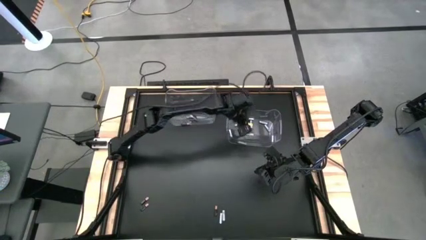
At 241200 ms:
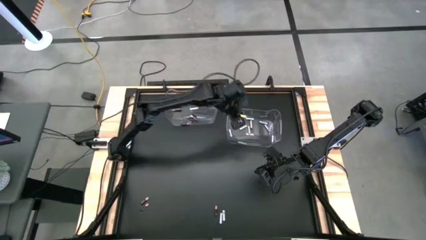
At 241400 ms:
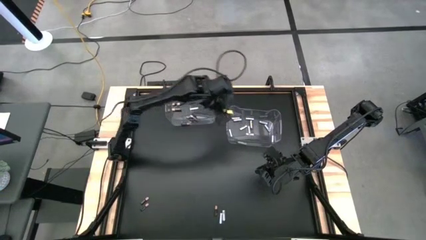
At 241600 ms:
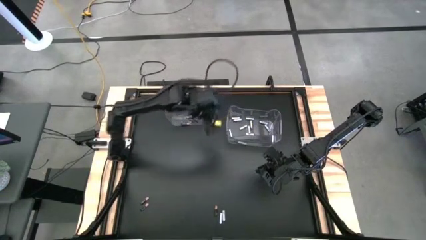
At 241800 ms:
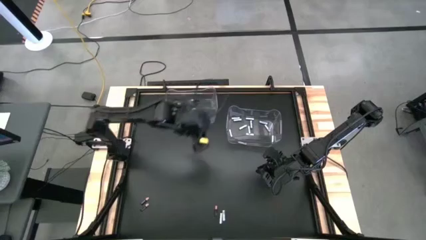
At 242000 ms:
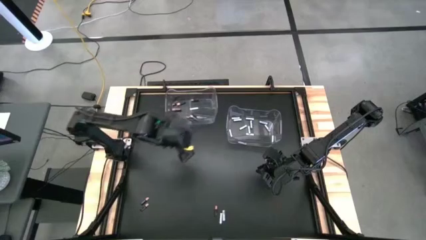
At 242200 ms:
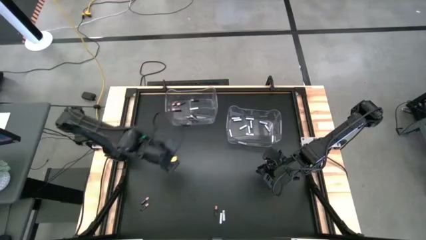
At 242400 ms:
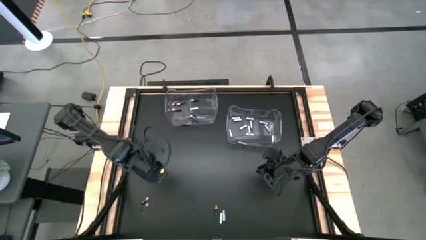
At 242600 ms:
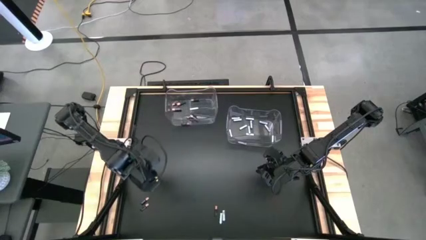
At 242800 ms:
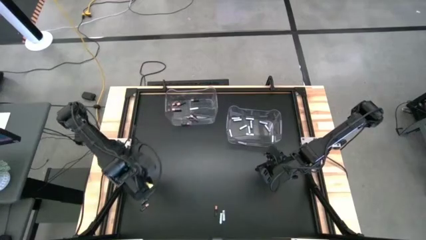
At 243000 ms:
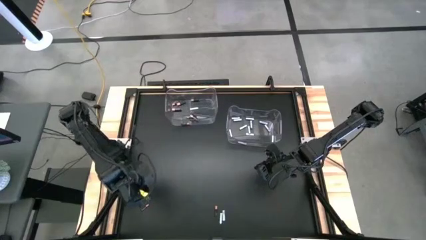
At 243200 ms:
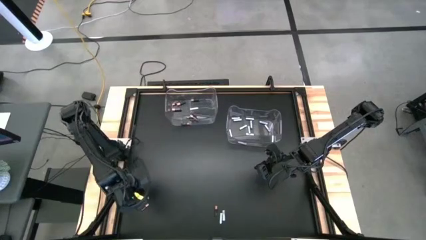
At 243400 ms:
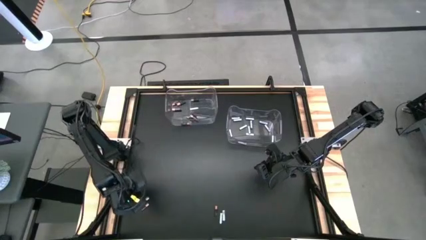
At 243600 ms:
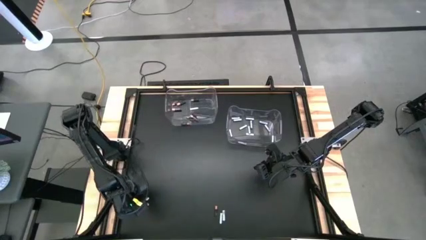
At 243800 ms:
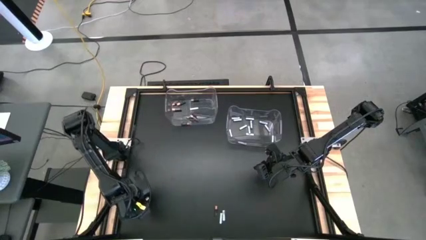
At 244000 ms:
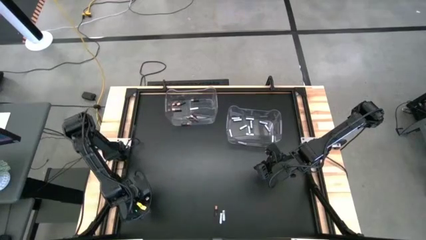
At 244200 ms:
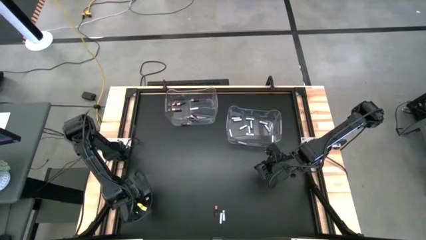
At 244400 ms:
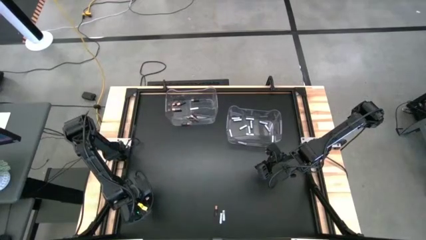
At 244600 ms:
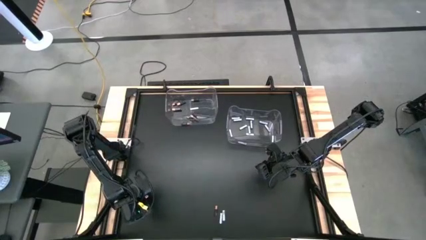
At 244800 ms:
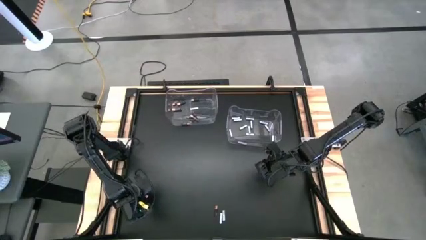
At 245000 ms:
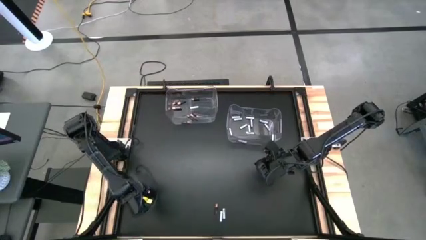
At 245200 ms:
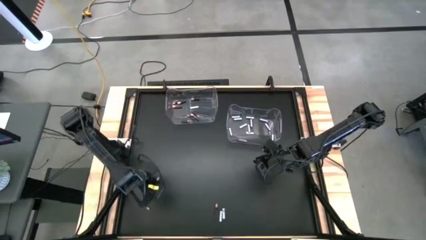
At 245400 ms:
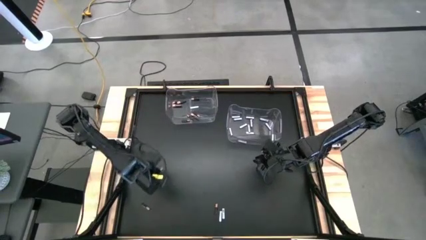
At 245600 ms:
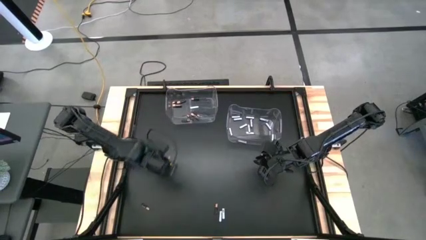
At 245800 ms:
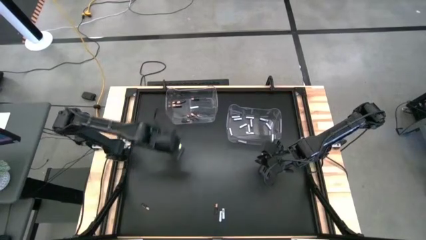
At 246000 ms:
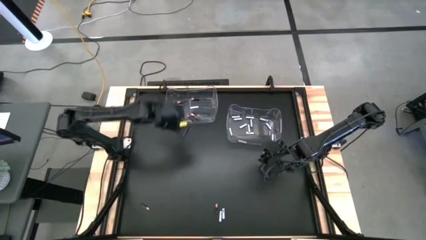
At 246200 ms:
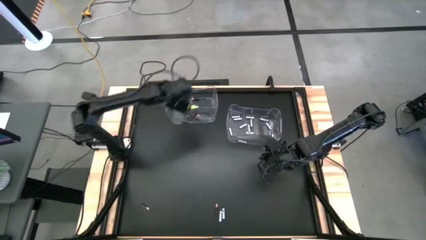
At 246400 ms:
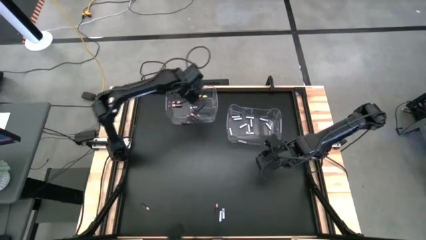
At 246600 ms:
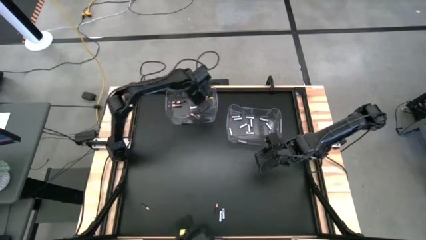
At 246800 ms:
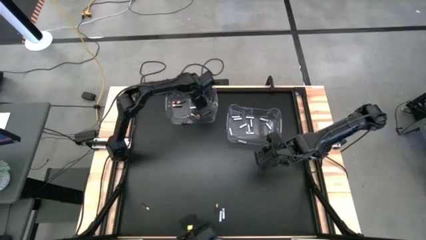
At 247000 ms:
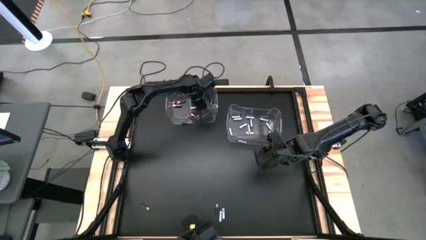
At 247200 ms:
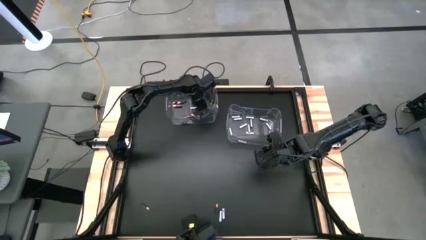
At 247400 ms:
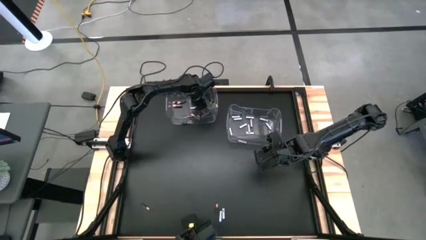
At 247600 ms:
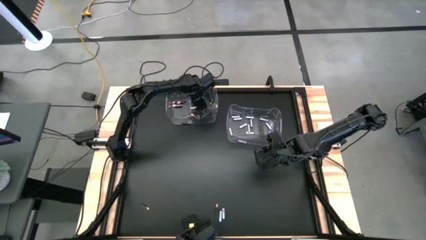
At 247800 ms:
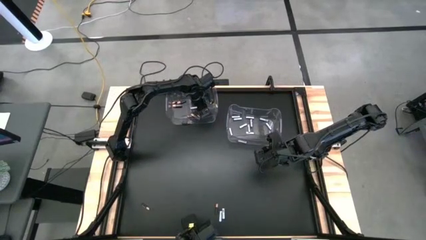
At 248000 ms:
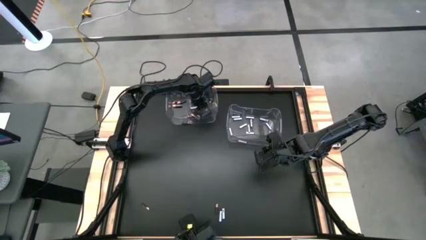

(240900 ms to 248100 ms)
Task: Sort batteries
Put the black battery into the left transparent bin

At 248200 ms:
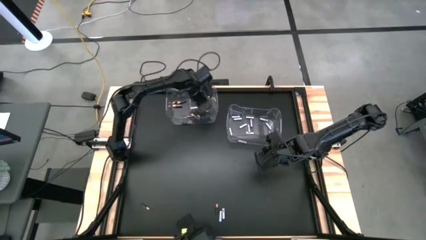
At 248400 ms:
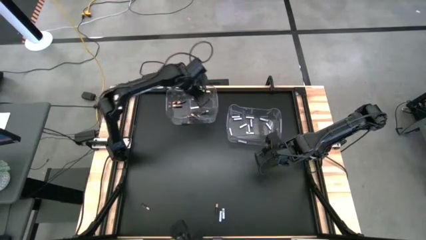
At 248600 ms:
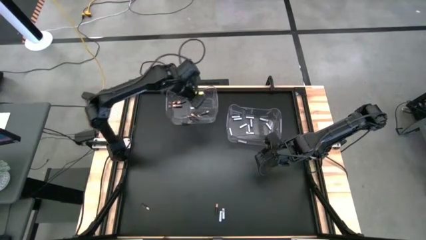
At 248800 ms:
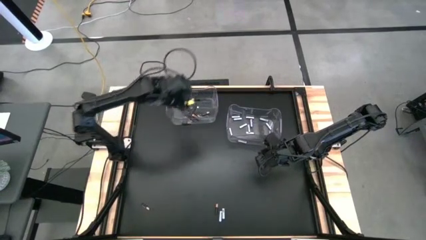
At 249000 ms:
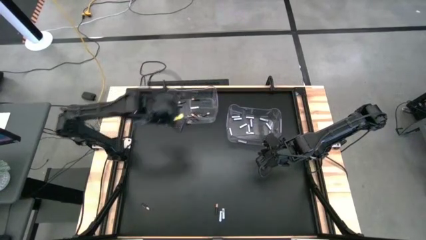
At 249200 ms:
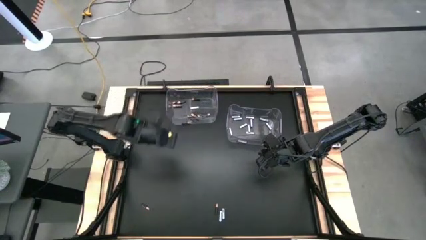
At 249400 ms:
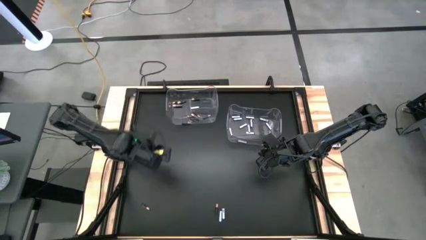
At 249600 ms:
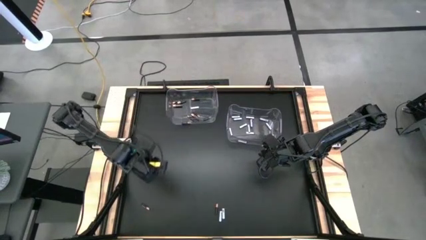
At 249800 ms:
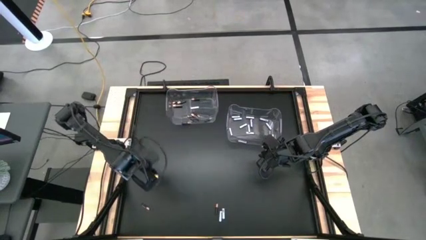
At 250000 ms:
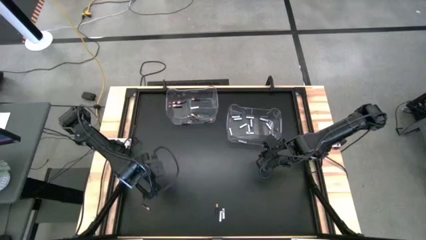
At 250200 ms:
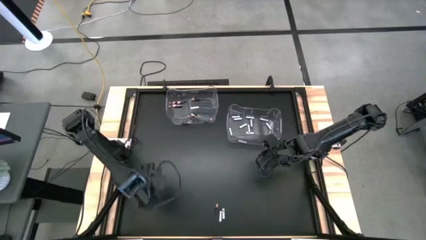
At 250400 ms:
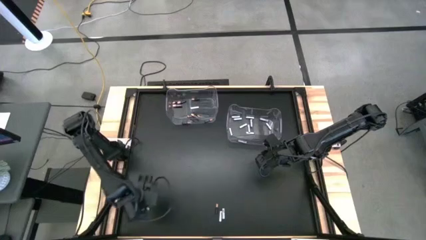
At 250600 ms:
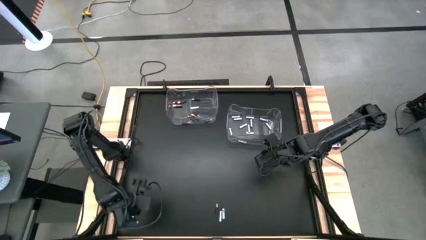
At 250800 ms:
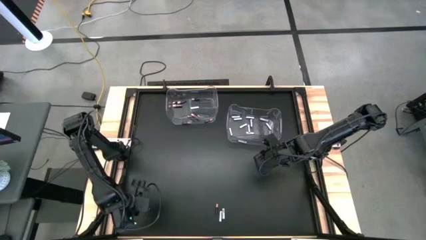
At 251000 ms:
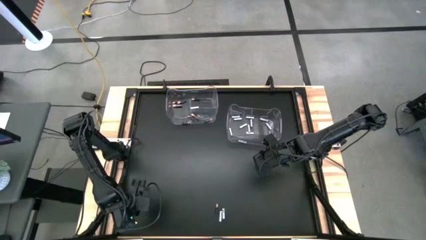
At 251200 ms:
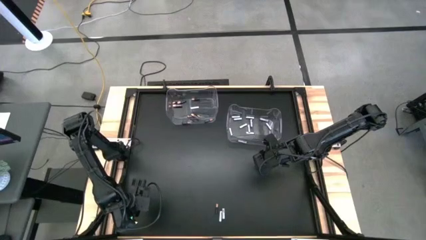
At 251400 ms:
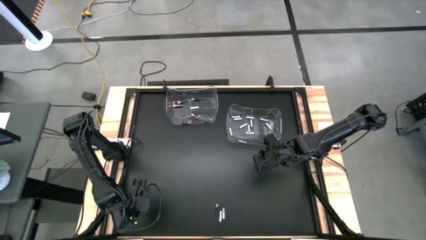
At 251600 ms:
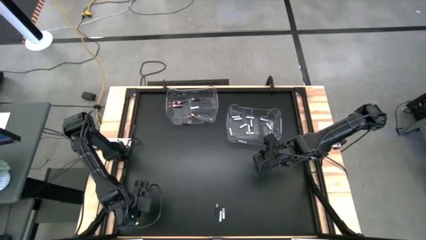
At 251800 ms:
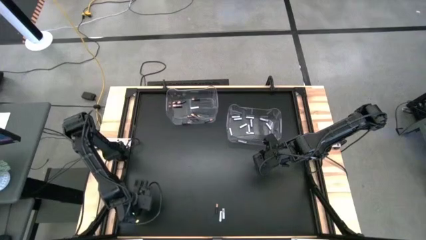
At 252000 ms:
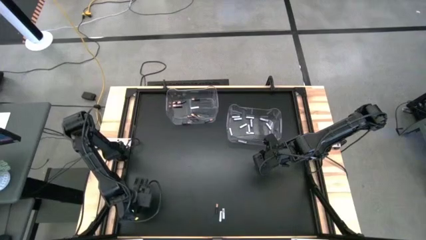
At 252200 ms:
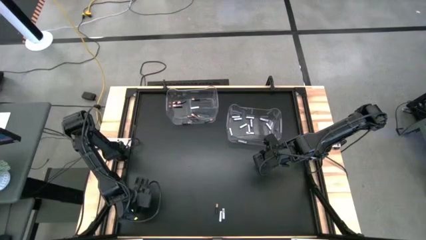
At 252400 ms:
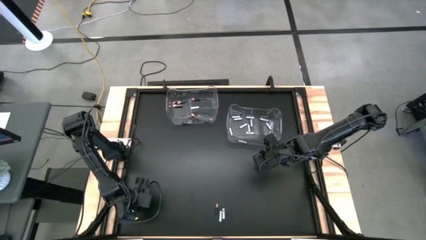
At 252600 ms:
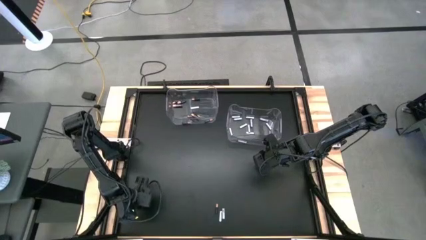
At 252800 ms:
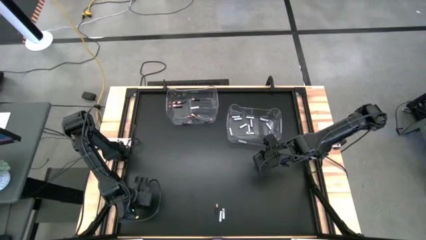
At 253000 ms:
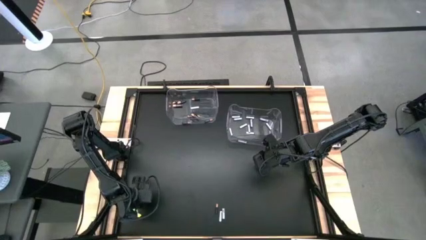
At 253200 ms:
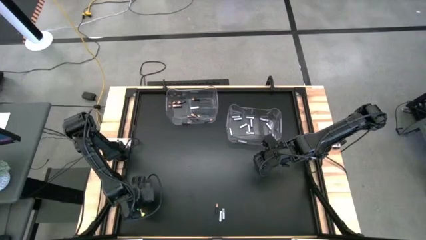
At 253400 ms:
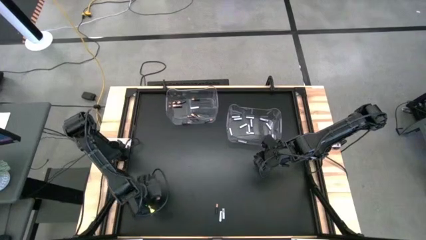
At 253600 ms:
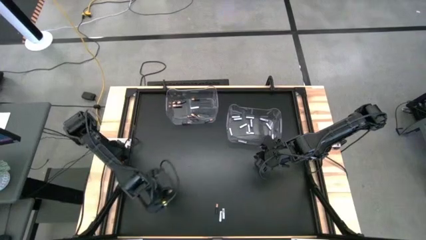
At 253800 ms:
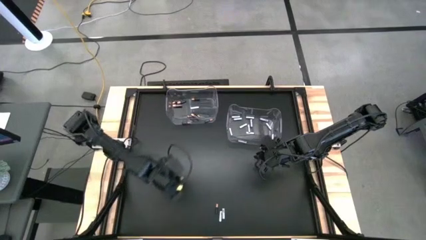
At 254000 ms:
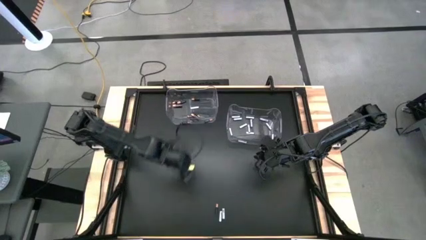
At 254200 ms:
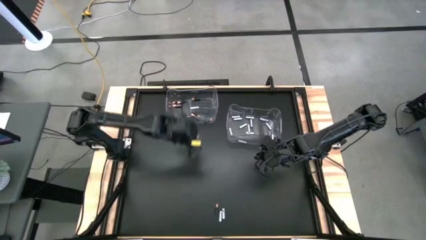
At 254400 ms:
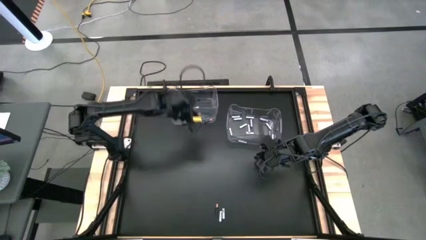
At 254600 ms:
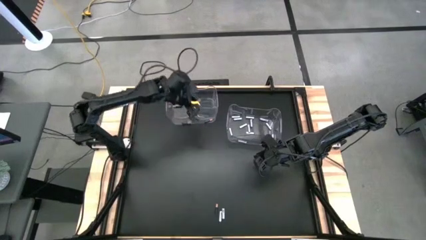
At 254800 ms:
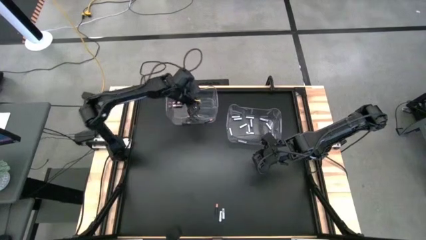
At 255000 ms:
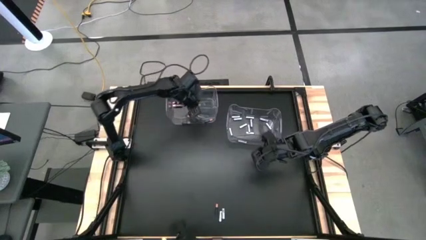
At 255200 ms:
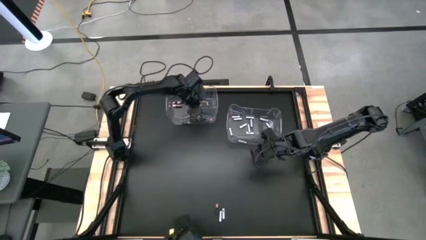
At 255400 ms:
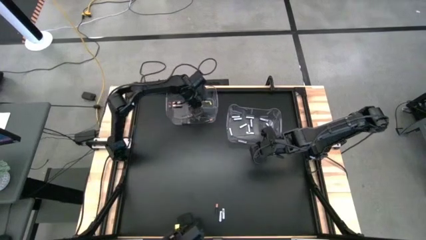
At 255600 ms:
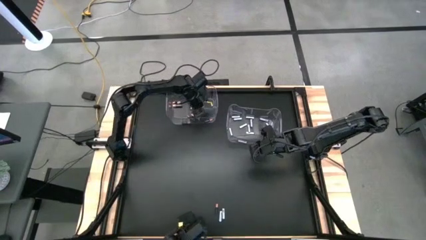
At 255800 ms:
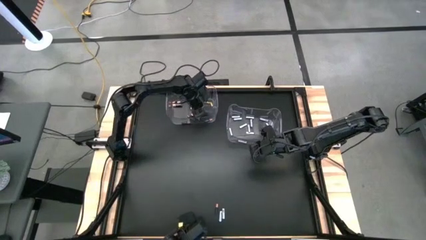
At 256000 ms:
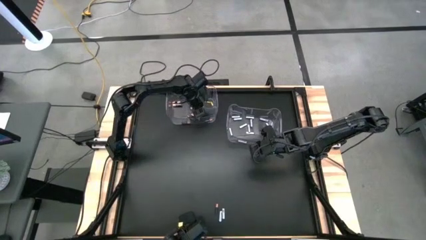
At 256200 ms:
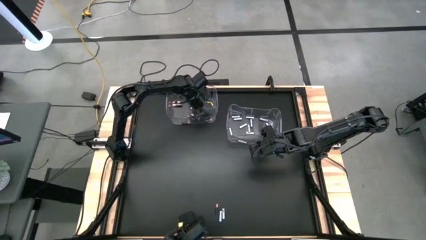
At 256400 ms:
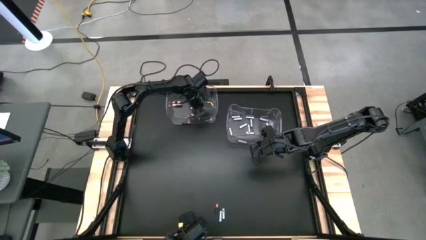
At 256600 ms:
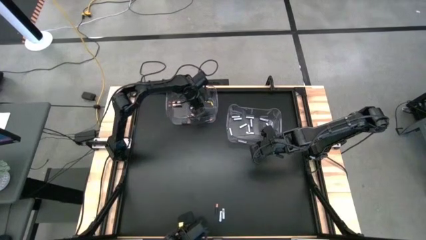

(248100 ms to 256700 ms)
Put the black battery into the left transparent bin
